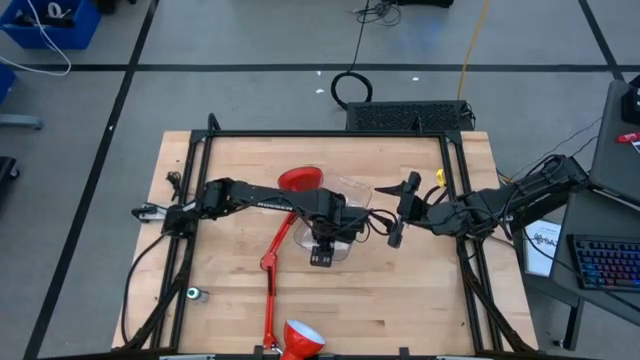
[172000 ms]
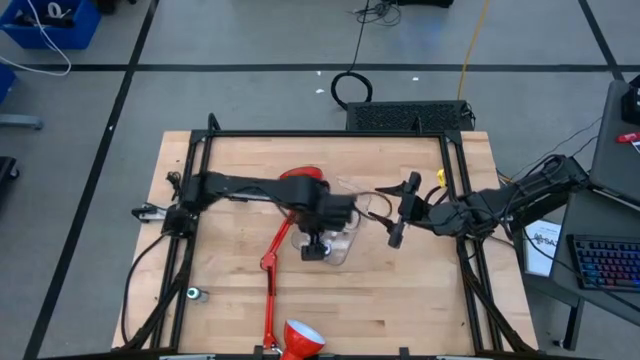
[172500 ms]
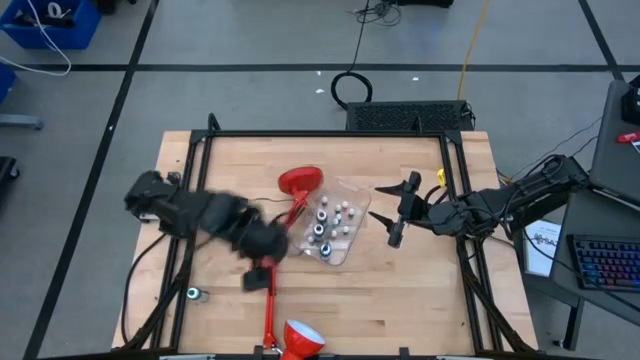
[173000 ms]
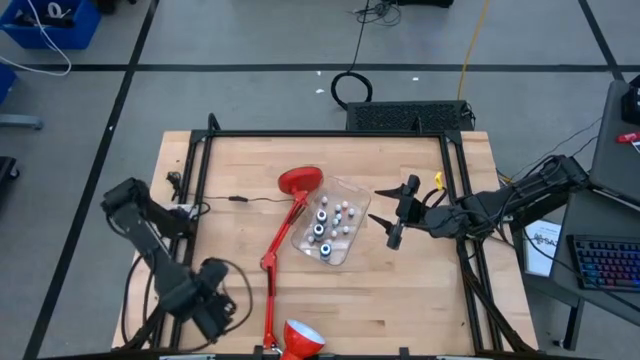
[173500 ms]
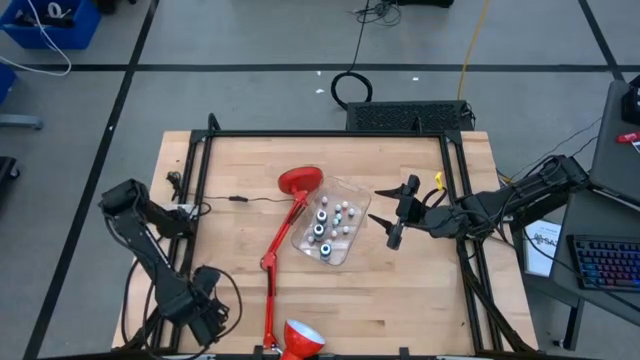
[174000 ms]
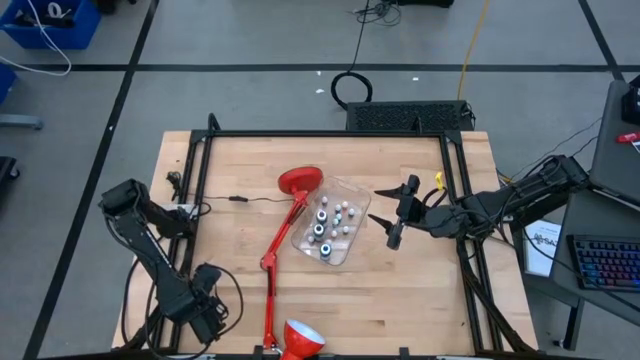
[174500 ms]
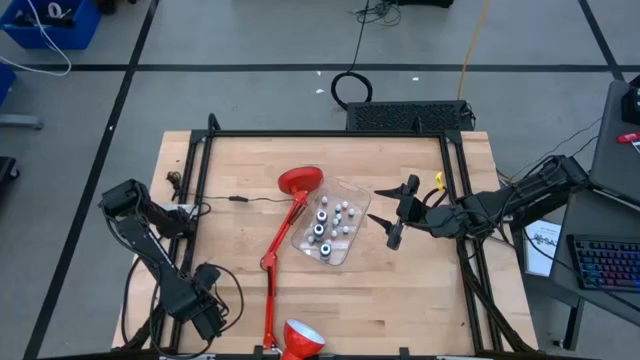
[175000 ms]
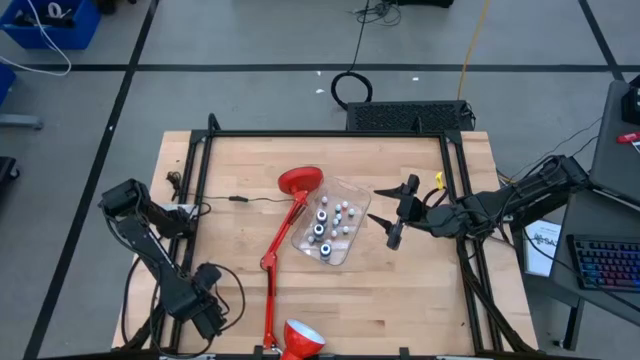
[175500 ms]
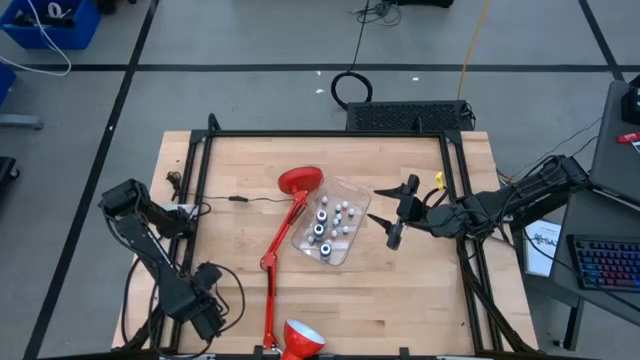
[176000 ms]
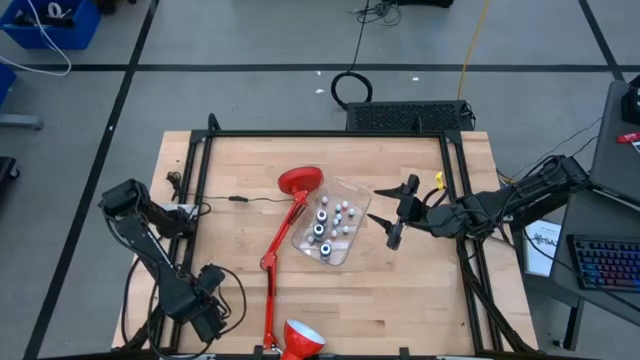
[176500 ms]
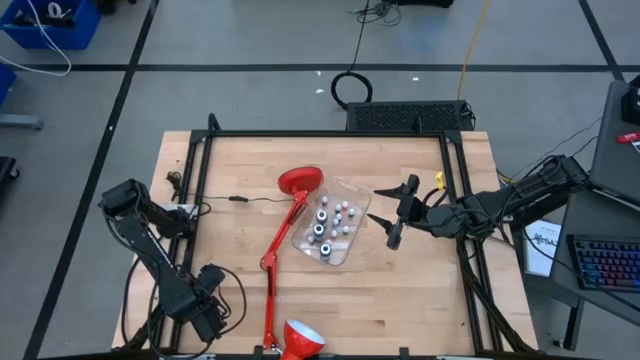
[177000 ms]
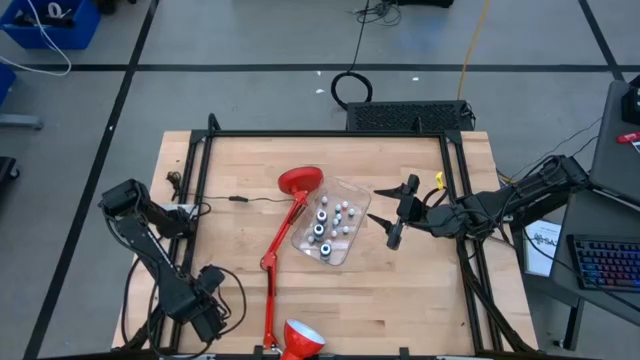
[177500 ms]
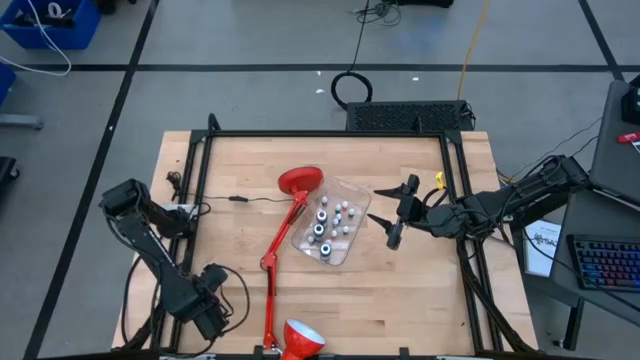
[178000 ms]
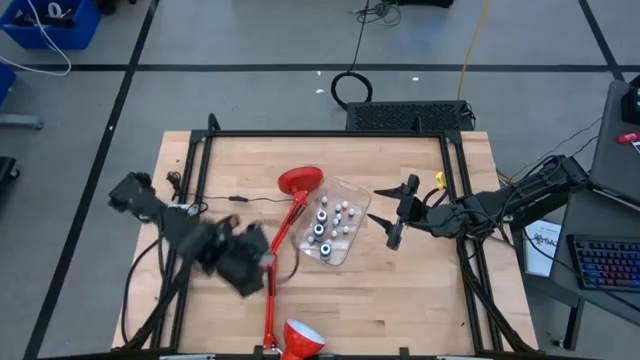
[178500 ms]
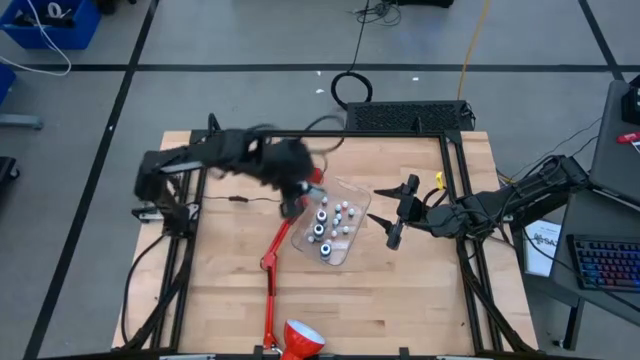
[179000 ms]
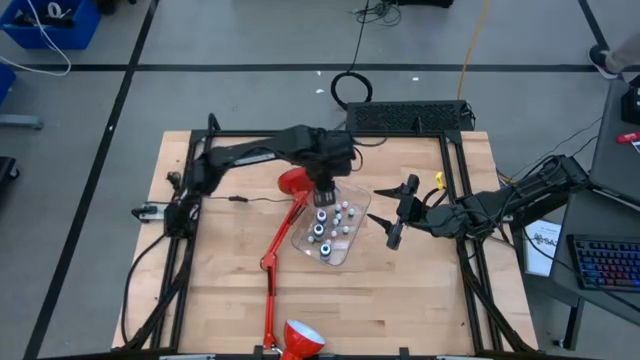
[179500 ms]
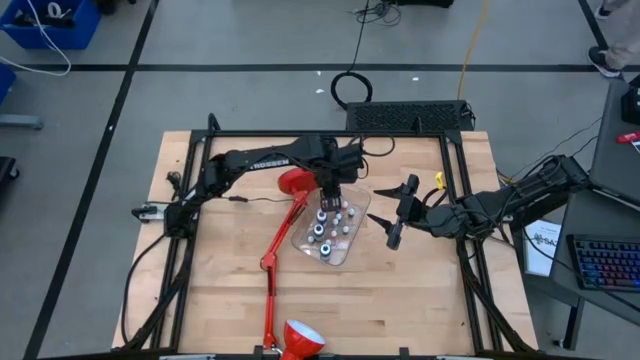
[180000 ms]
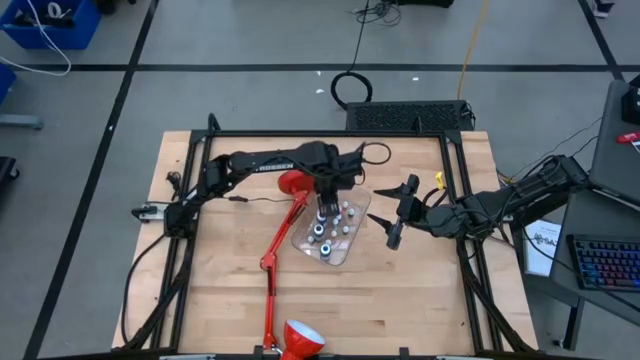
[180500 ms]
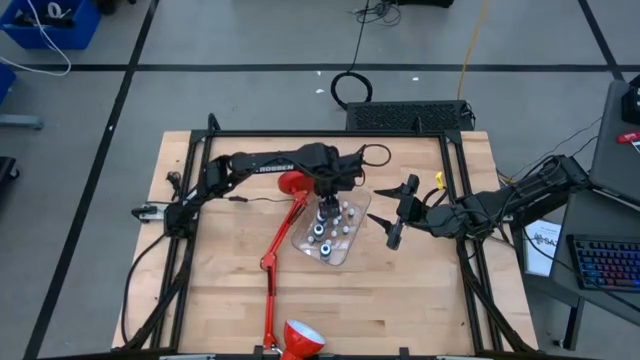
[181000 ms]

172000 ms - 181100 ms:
Task: Pick & Place food coloring
Put the large green food coloring bottle into the transparent bin

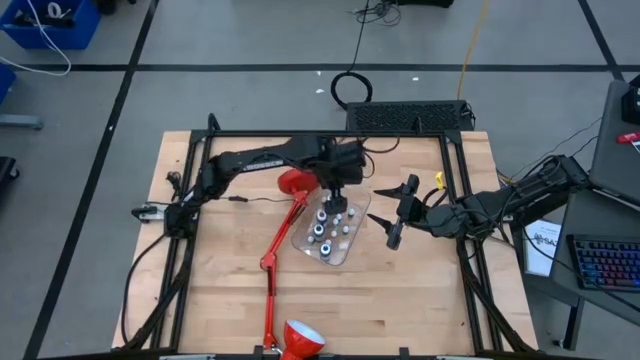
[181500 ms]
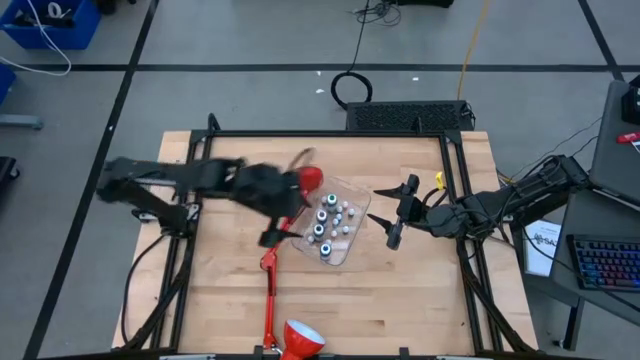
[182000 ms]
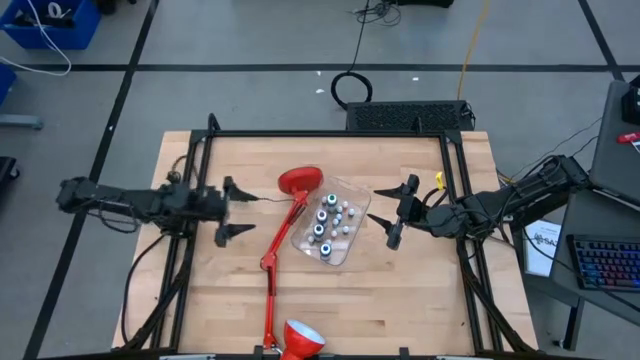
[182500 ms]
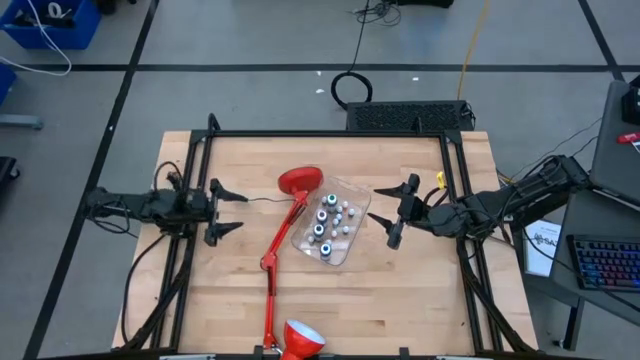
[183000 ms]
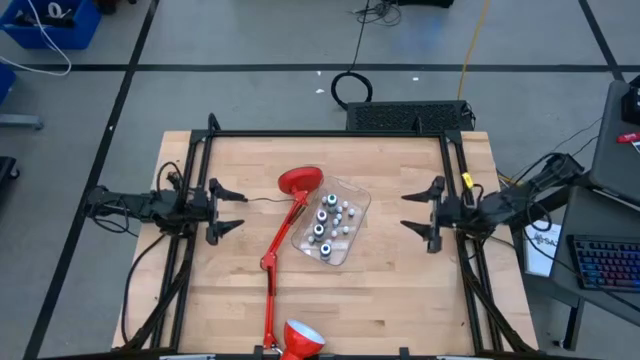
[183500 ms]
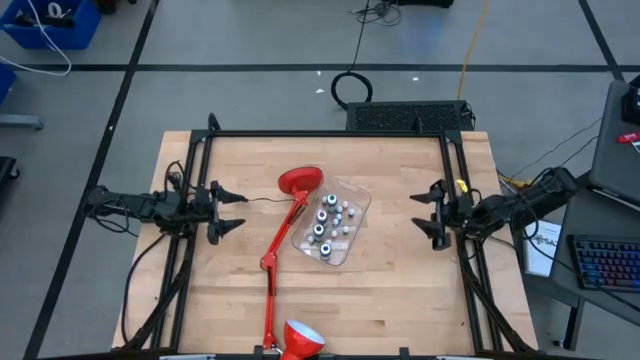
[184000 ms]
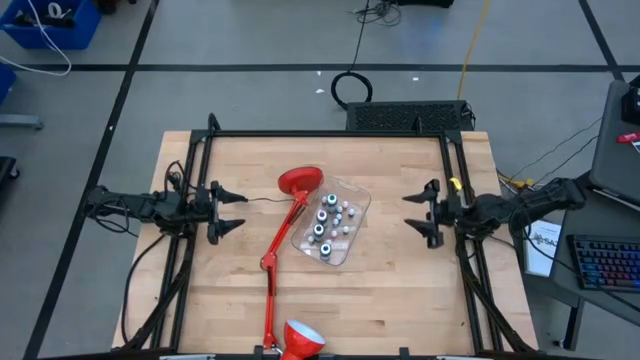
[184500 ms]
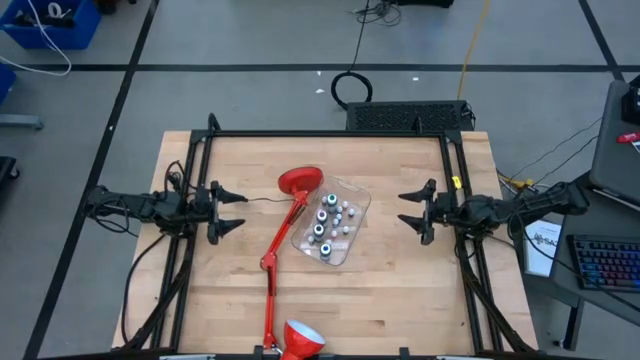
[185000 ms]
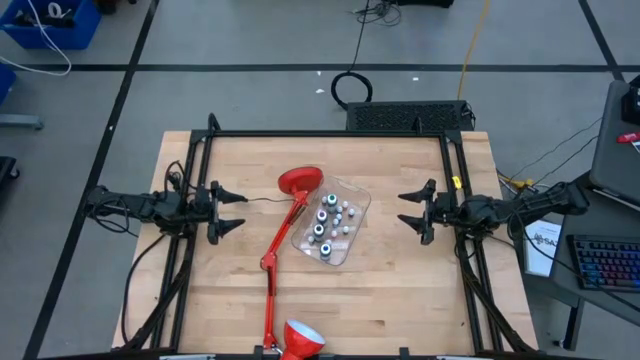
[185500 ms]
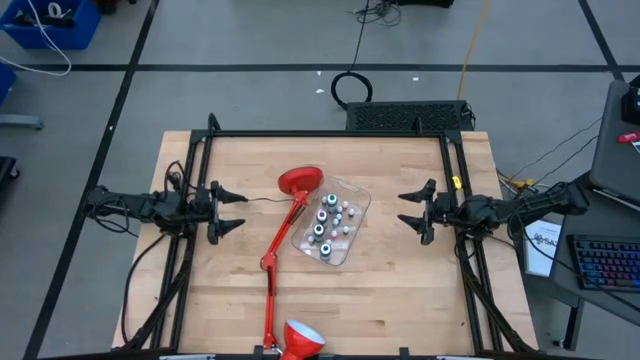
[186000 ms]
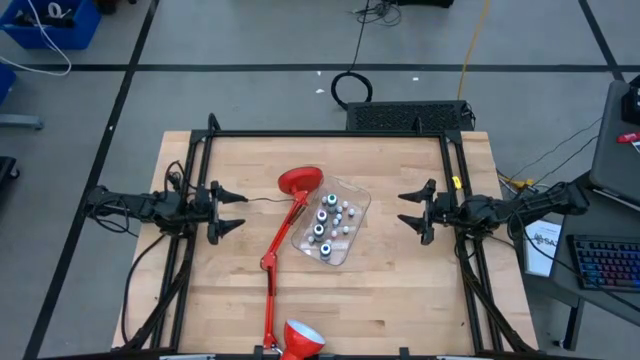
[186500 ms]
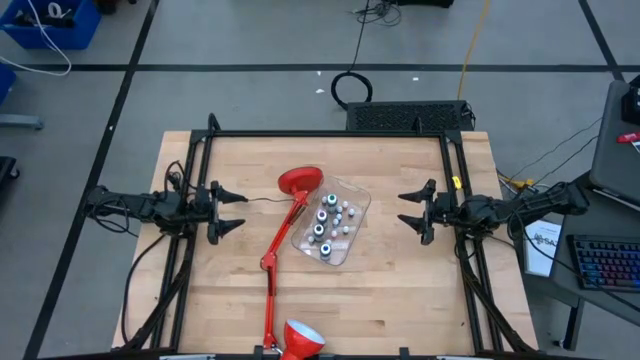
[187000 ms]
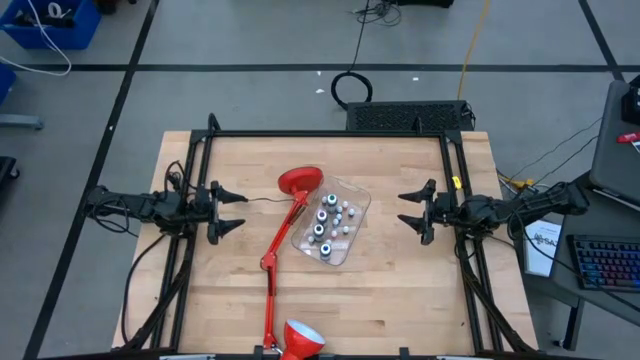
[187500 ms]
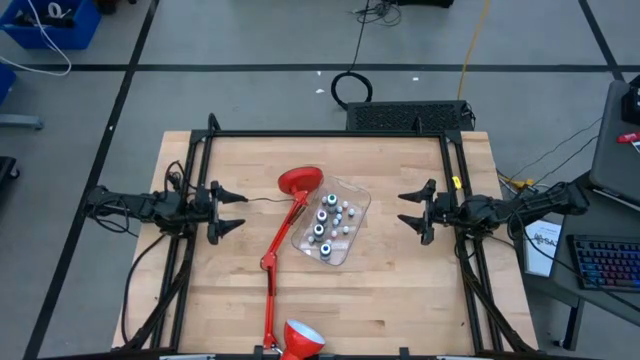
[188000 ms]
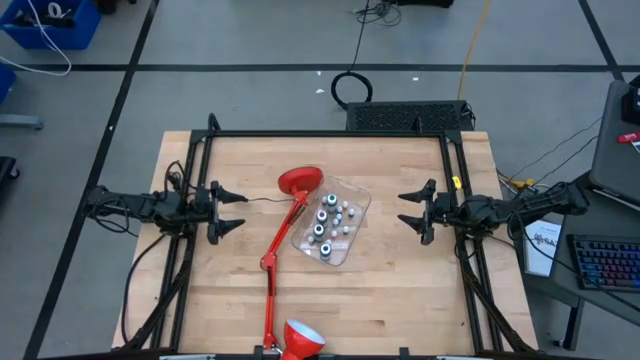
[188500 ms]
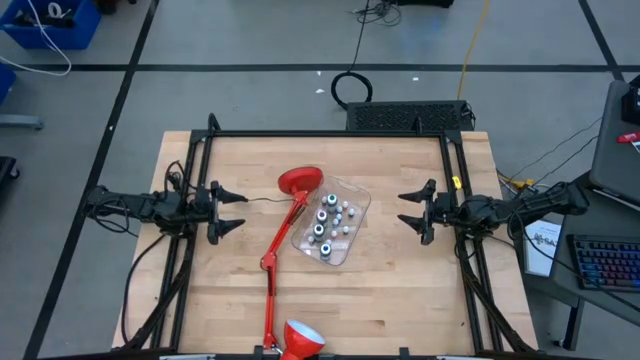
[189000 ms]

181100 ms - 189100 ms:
Return to Home Position
